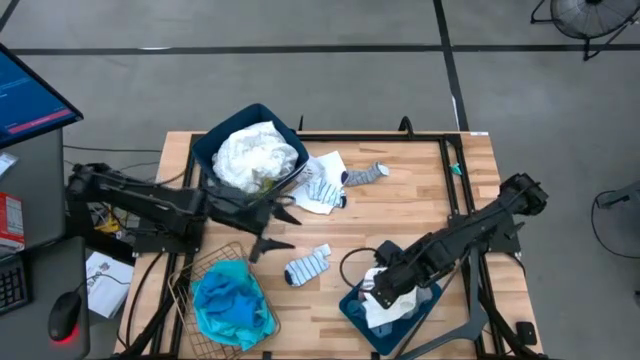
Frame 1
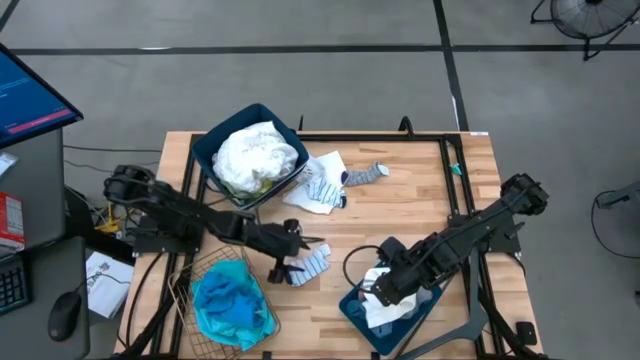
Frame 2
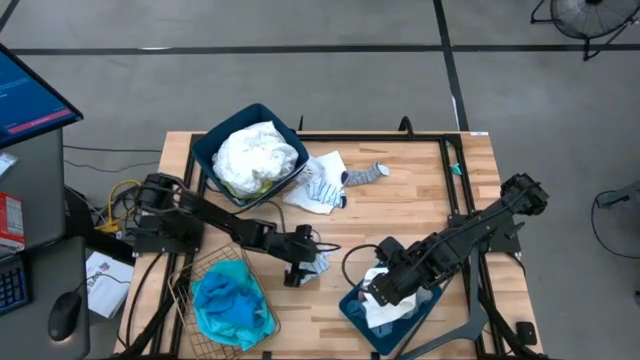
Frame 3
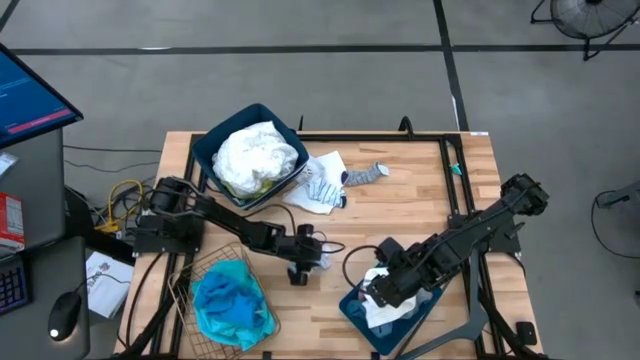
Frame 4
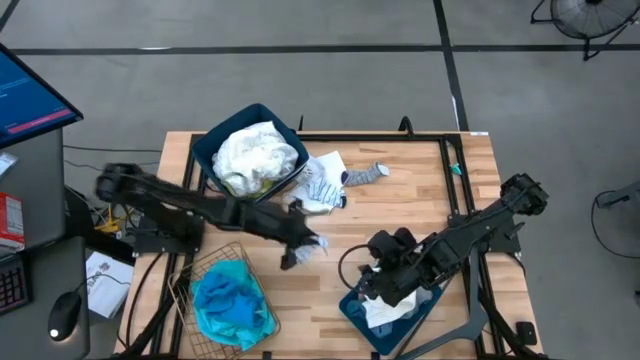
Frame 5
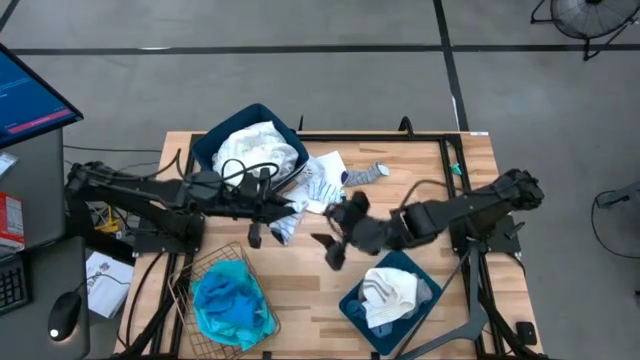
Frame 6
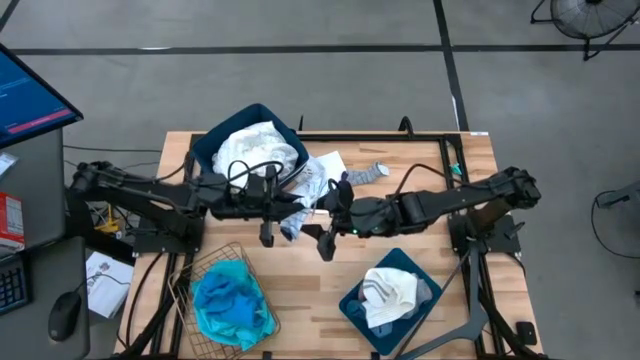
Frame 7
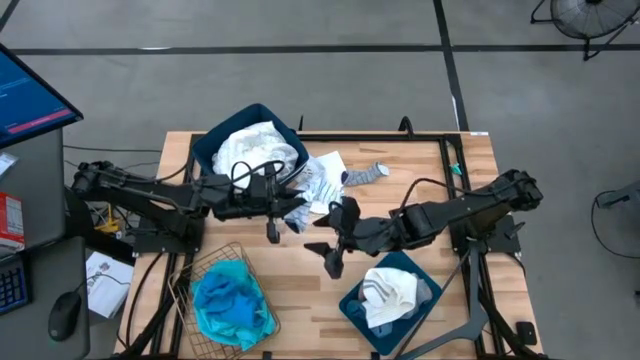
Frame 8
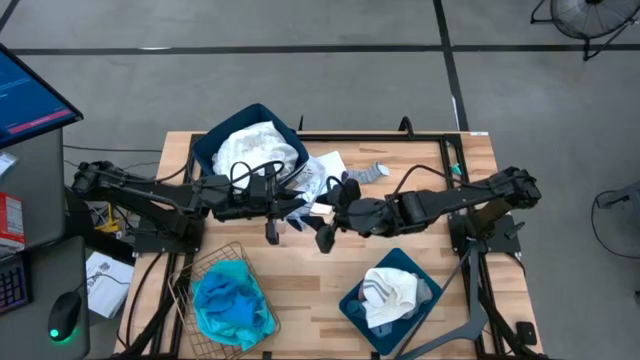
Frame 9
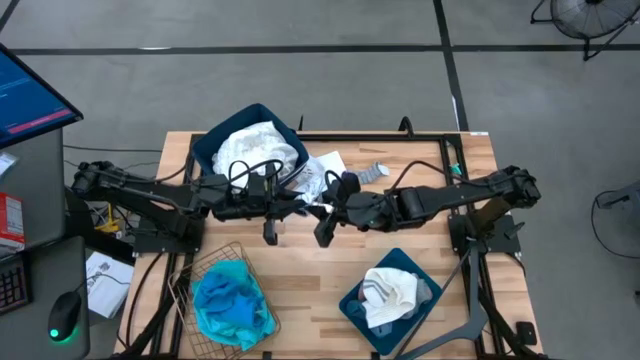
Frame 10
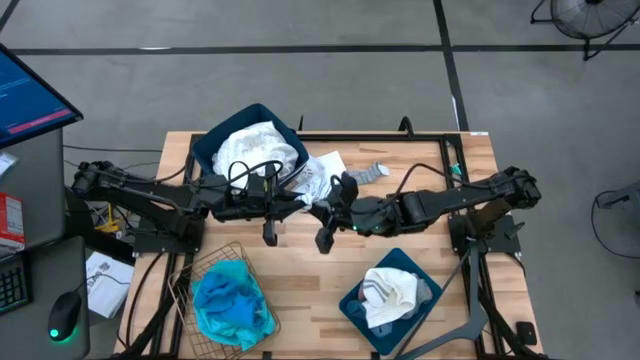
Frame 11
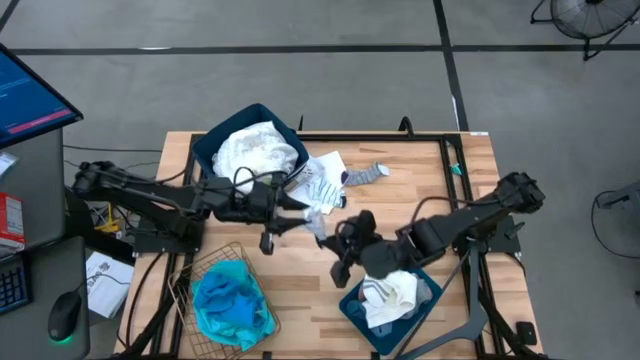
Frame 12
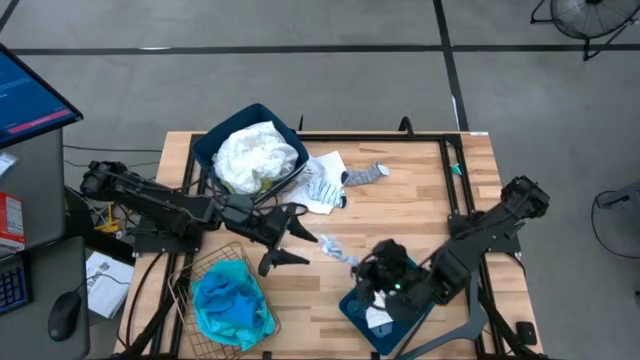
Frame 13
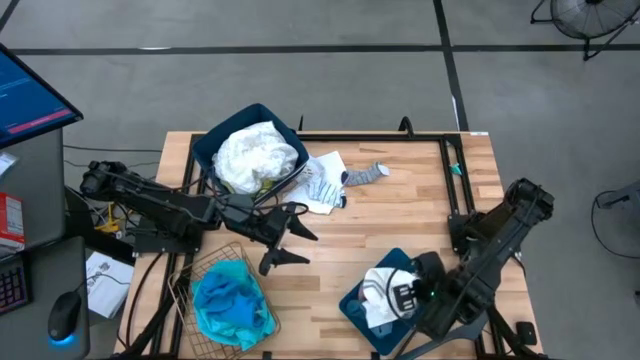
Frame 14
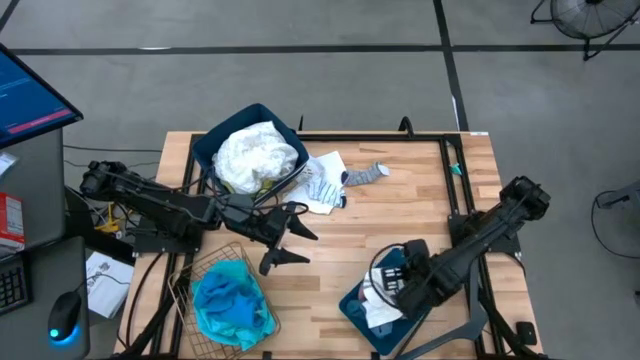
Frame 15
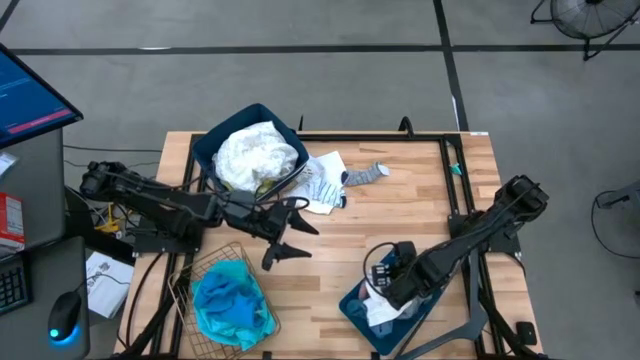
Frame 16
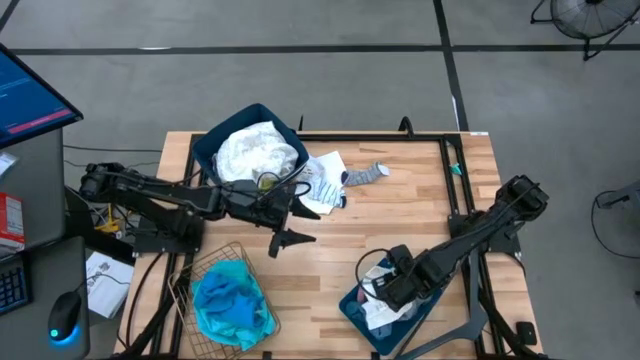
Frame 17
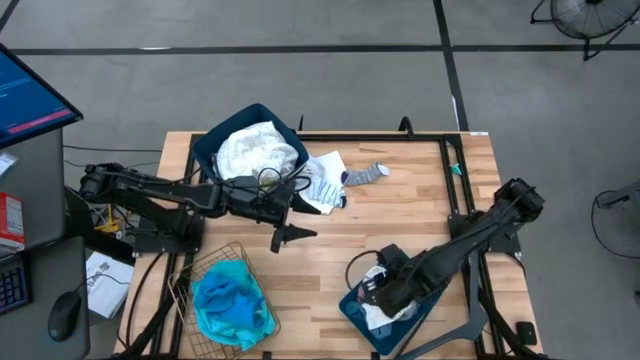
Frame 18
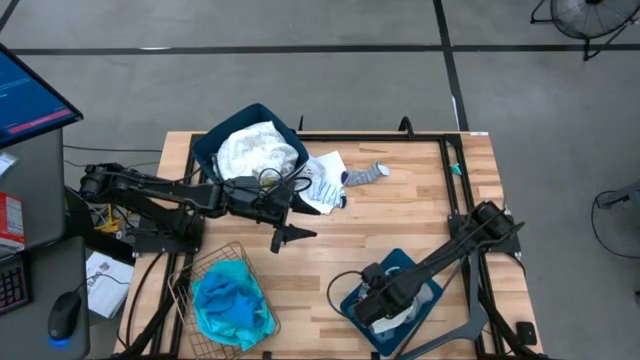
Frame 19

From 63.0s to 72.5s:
Task: Pick & Place Cloths
Put the bottom white patterned sock into the blue bin

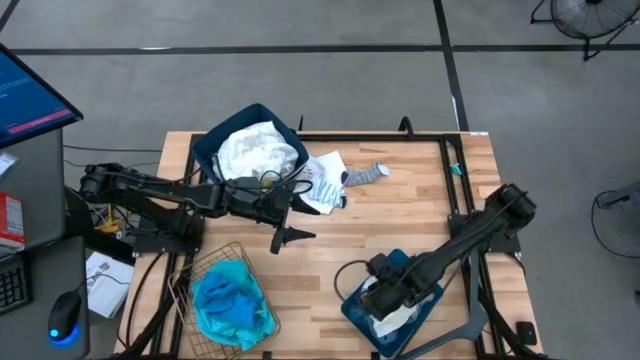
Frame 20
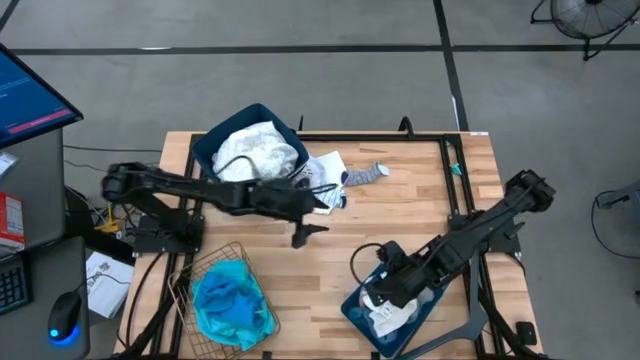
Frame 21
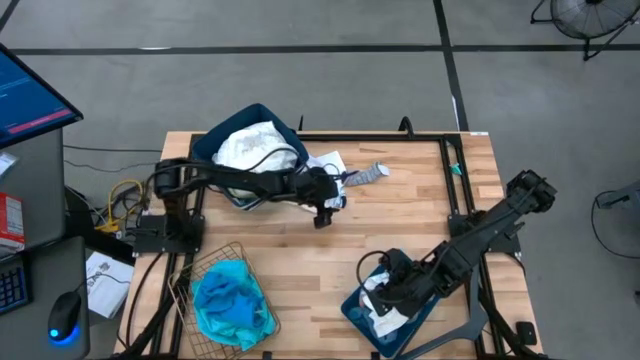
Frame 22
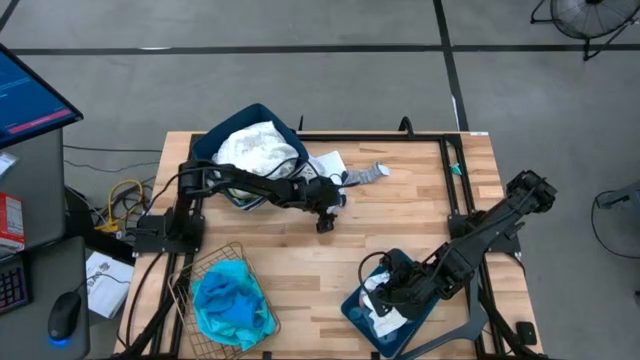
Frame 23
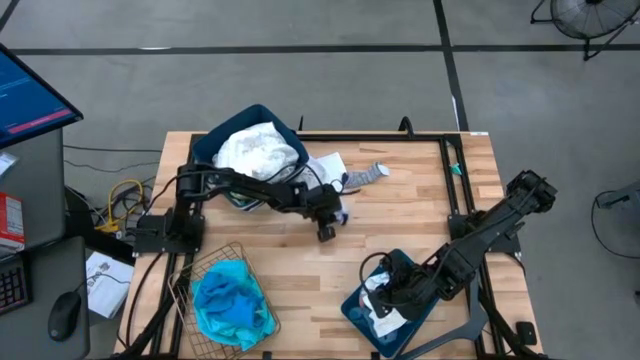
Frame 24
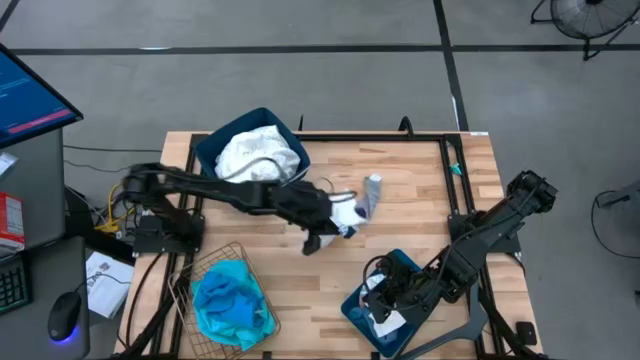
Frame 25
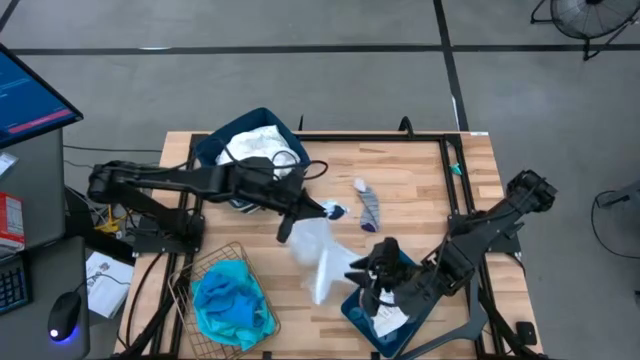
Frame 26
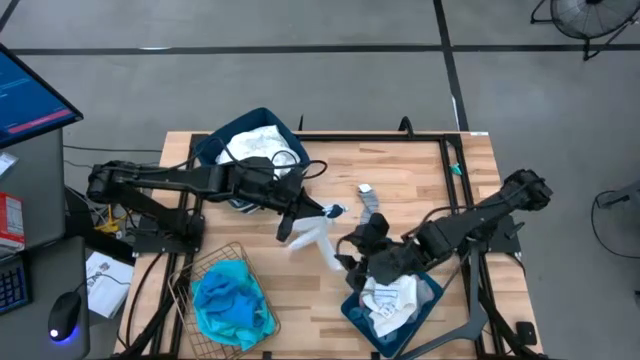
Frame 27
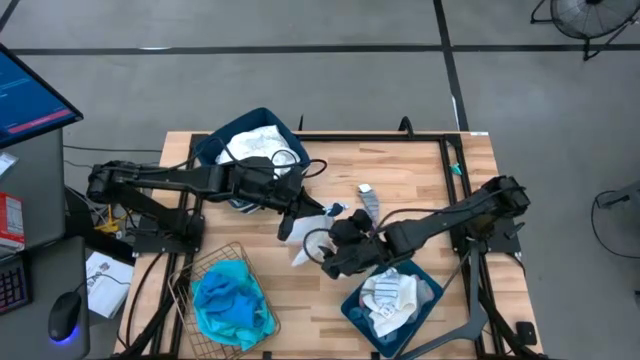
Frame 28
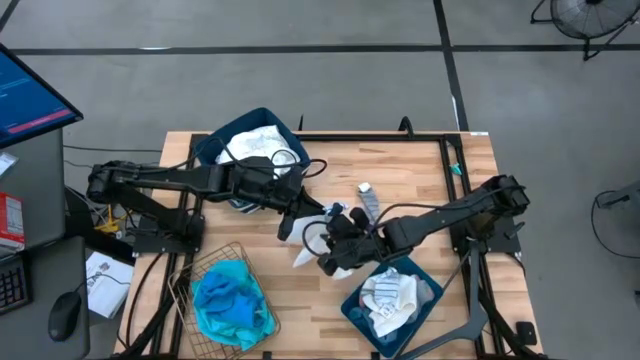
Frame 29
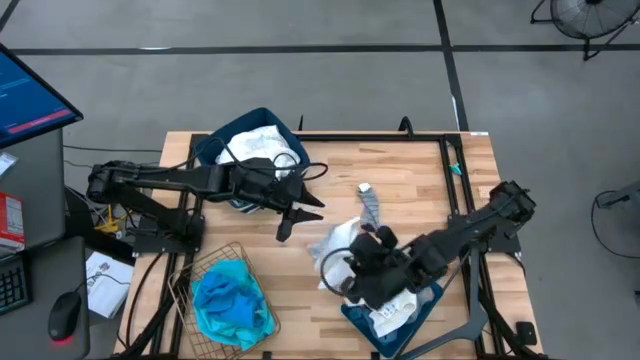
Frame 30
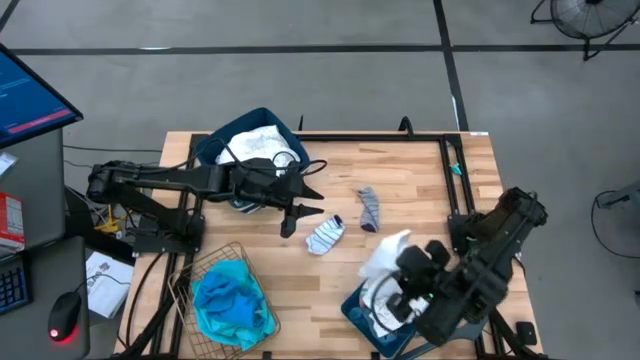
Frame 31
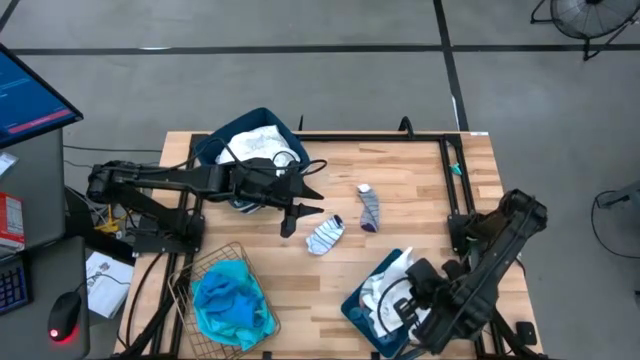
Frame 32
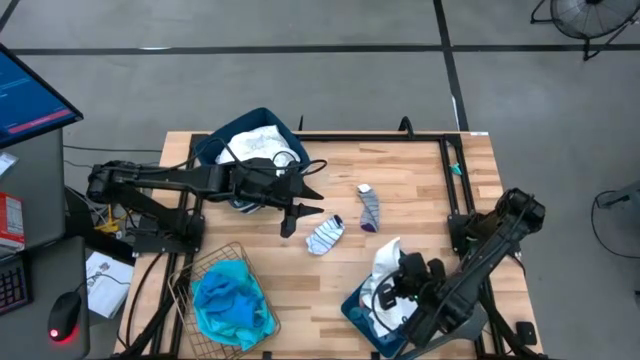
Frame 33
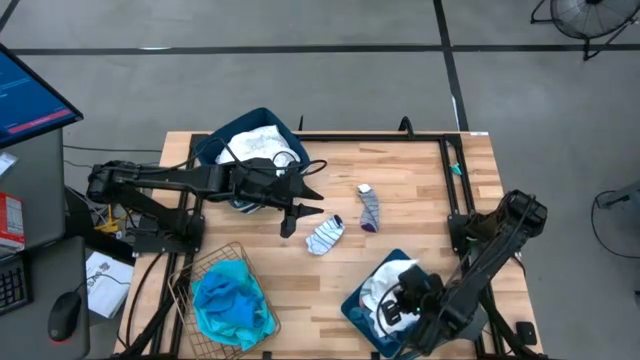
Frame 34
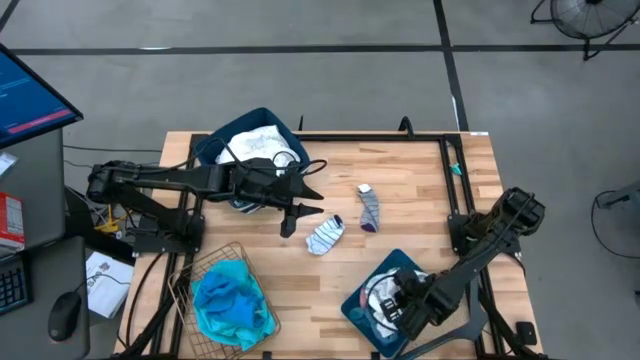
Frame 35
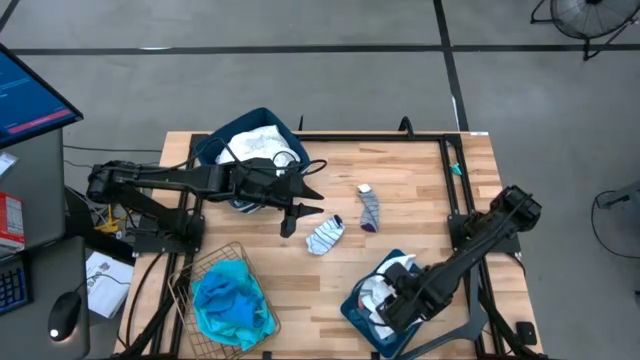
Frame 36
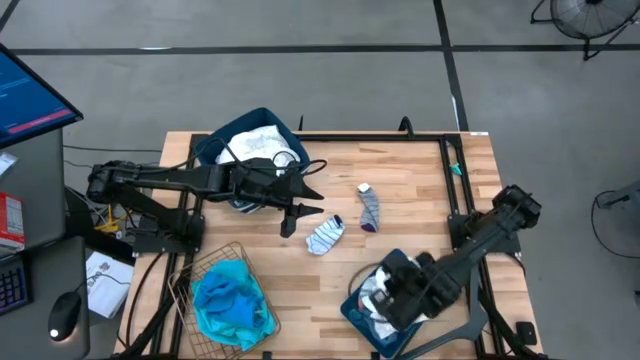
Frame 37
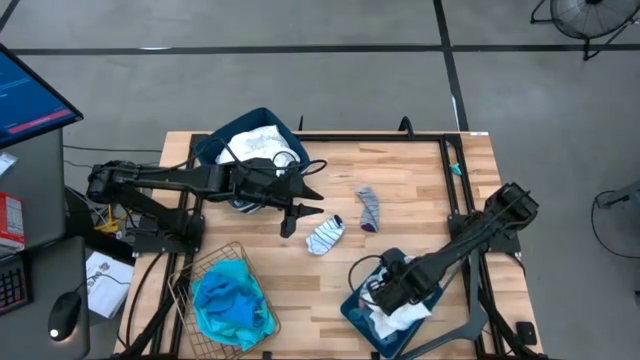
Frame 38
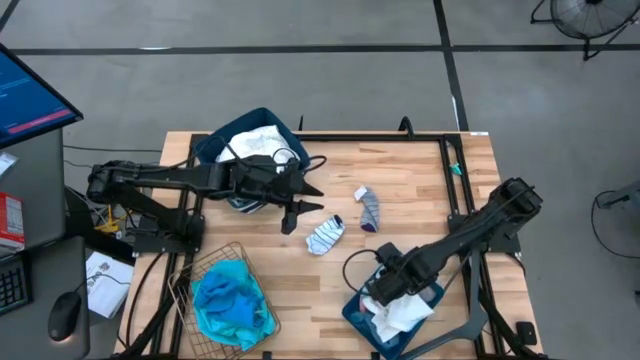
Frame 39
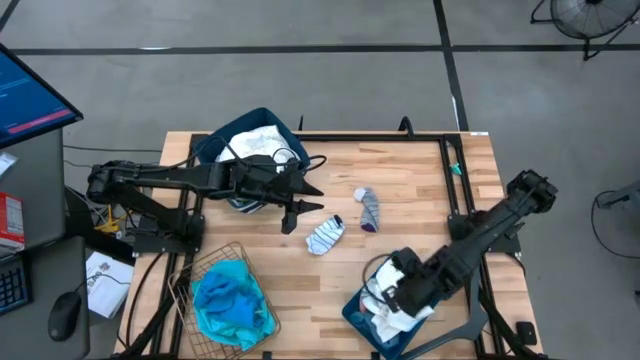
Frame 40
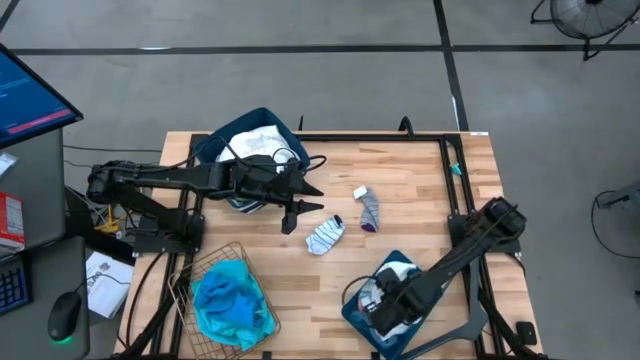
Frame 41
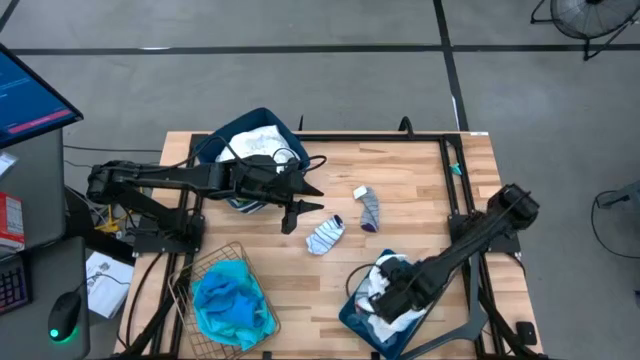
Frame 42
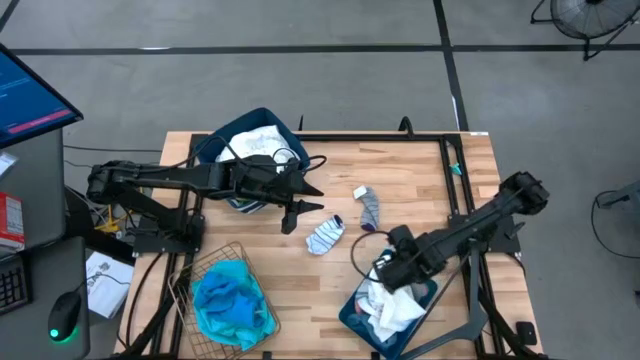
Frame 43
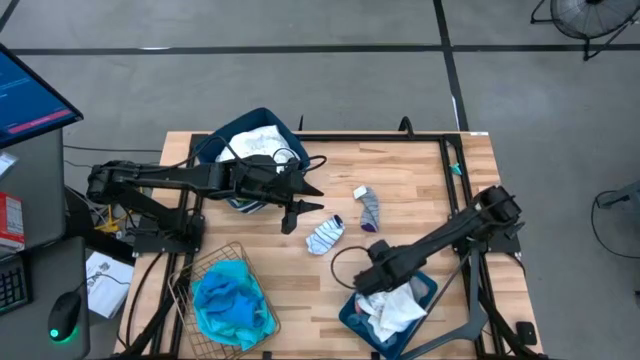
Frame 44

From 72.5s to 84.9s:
Put the white short into the wire basket
